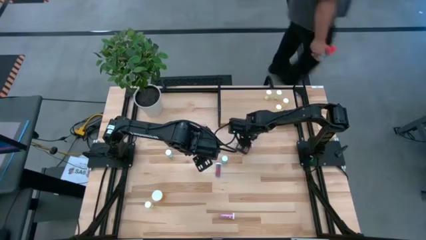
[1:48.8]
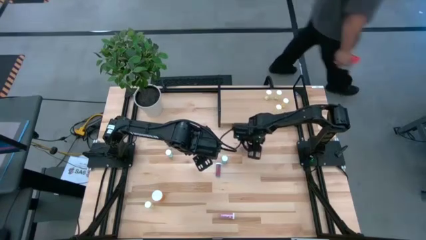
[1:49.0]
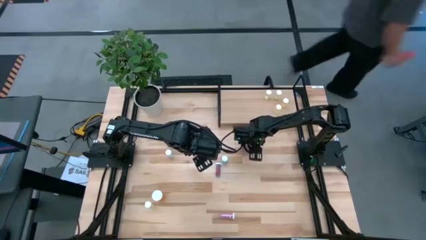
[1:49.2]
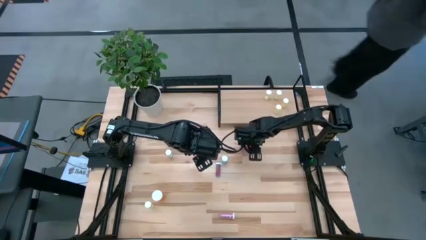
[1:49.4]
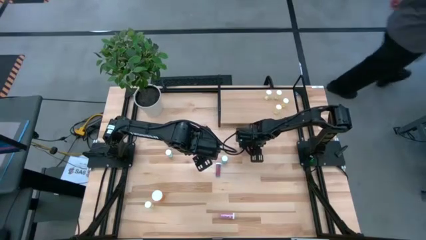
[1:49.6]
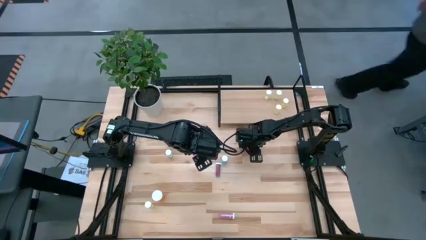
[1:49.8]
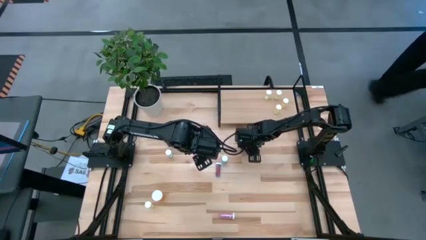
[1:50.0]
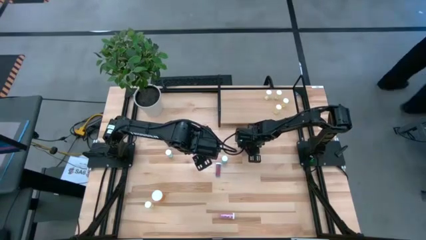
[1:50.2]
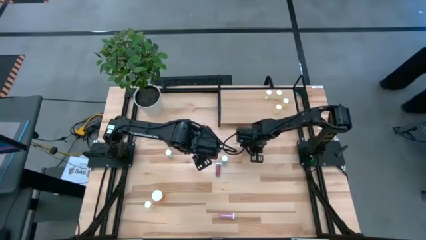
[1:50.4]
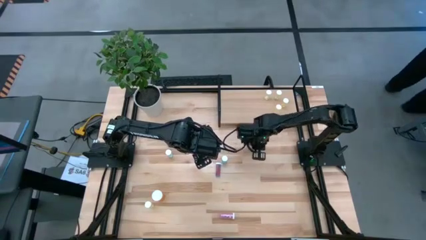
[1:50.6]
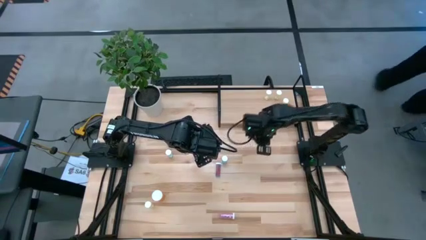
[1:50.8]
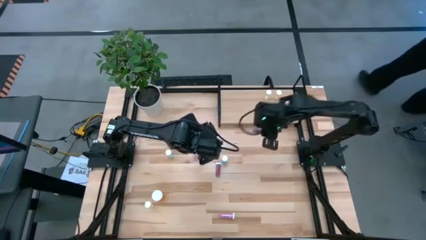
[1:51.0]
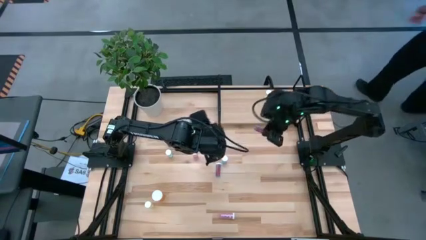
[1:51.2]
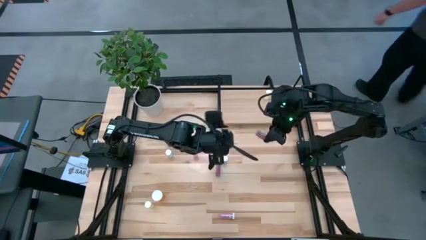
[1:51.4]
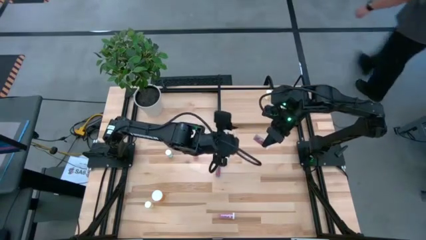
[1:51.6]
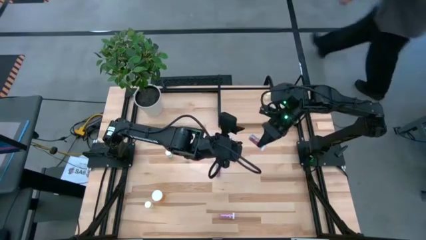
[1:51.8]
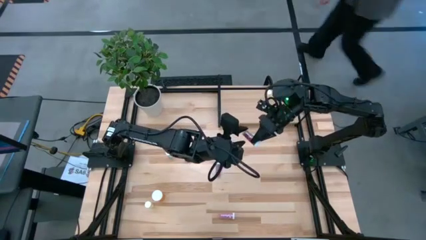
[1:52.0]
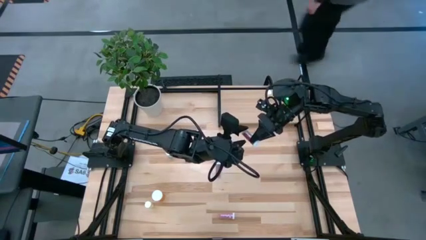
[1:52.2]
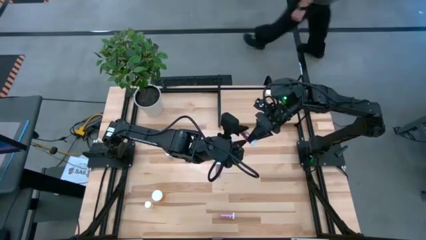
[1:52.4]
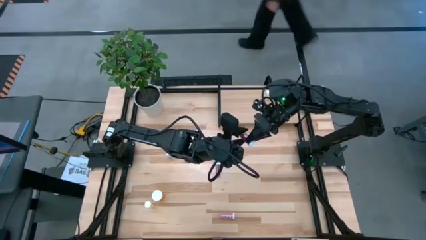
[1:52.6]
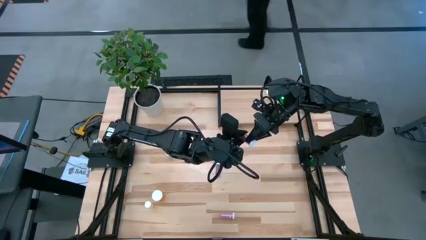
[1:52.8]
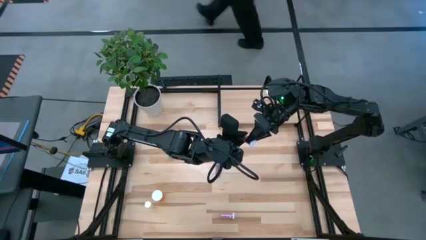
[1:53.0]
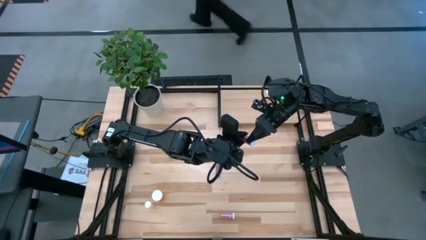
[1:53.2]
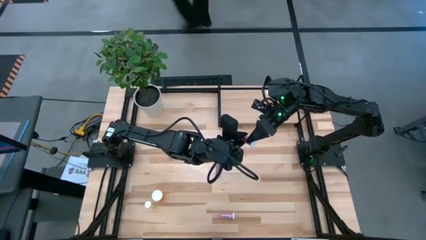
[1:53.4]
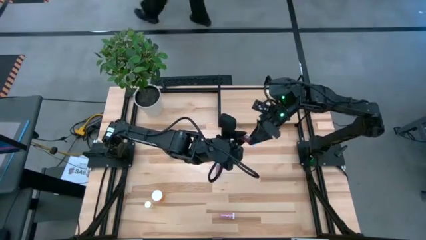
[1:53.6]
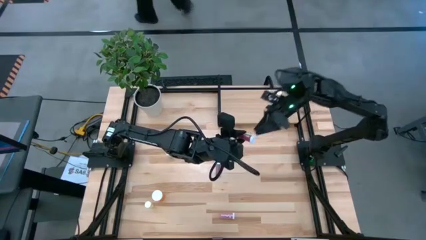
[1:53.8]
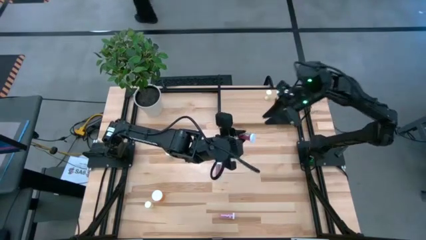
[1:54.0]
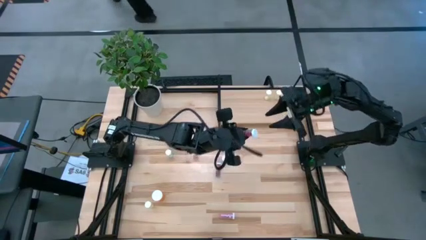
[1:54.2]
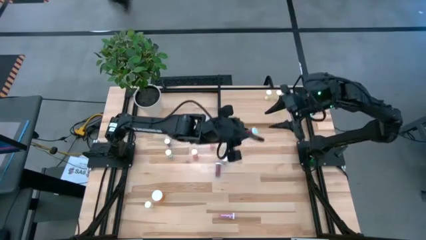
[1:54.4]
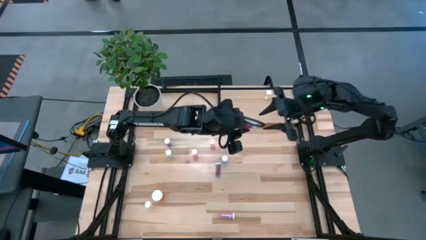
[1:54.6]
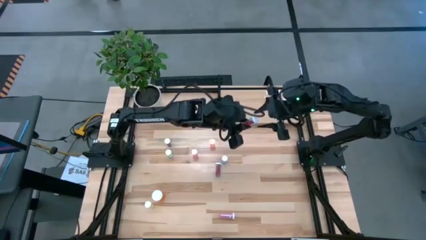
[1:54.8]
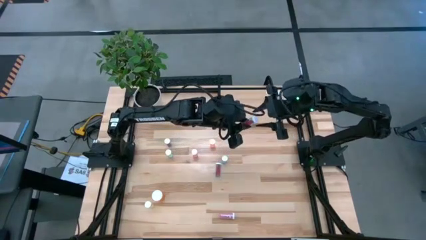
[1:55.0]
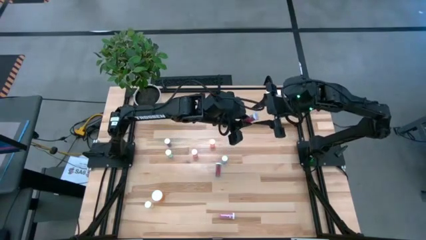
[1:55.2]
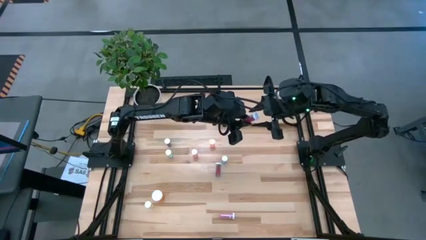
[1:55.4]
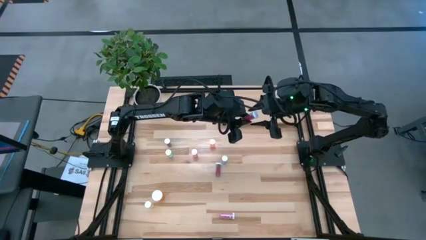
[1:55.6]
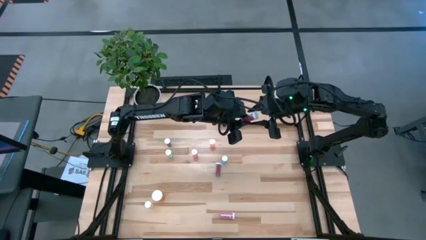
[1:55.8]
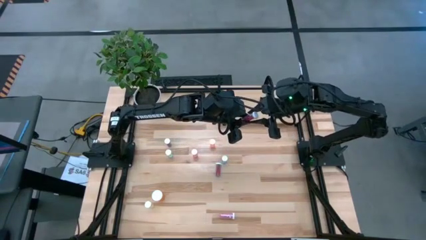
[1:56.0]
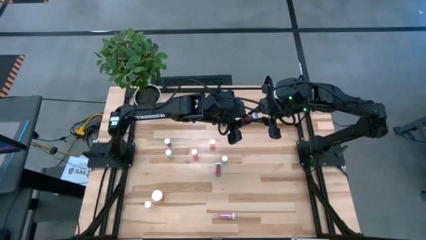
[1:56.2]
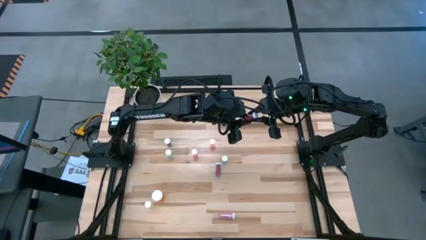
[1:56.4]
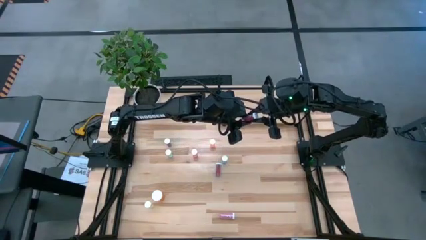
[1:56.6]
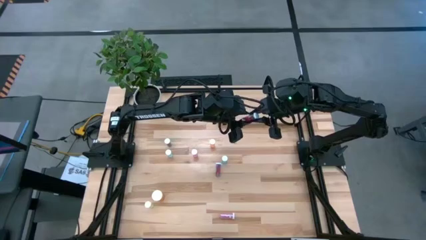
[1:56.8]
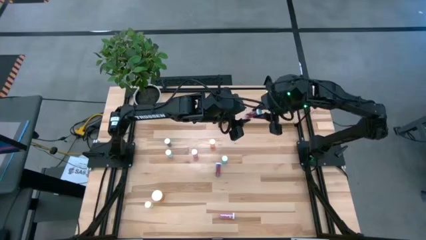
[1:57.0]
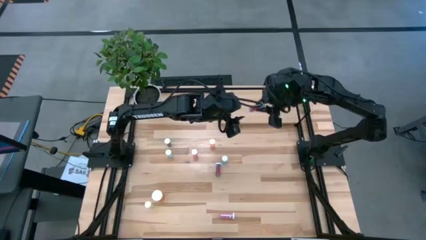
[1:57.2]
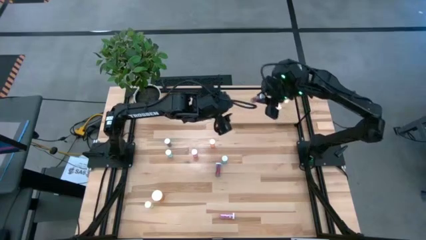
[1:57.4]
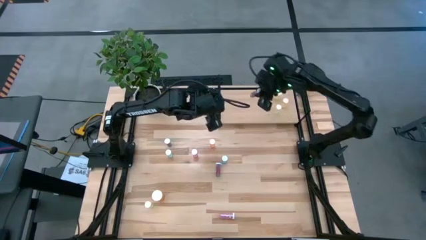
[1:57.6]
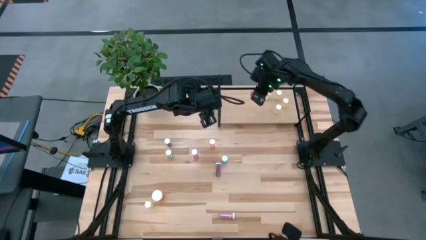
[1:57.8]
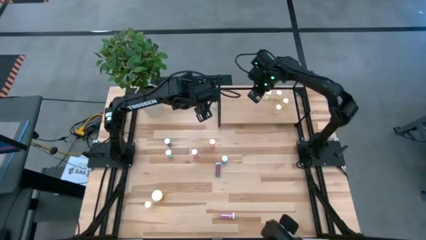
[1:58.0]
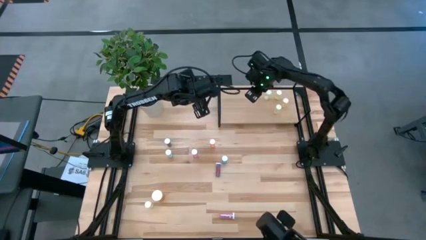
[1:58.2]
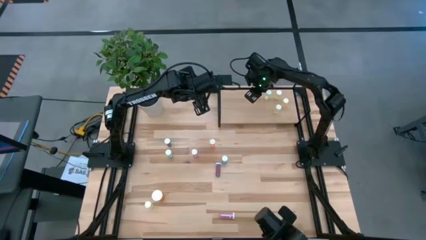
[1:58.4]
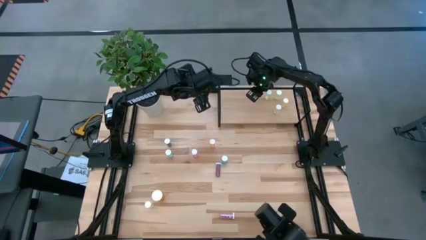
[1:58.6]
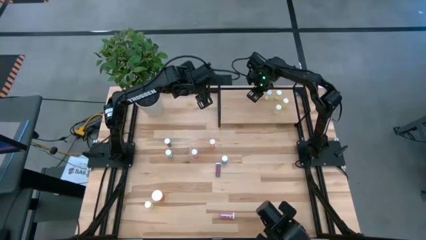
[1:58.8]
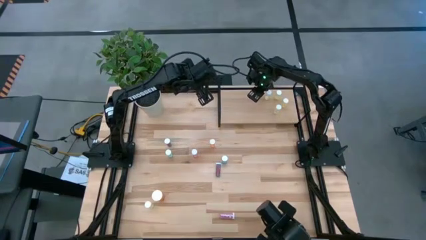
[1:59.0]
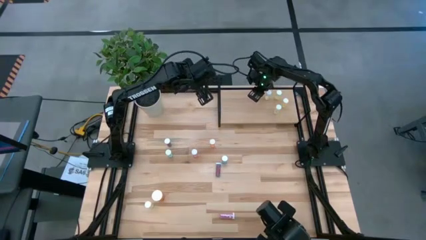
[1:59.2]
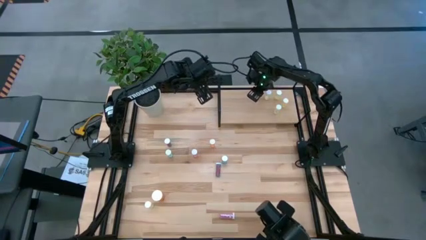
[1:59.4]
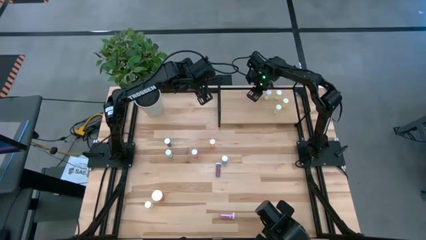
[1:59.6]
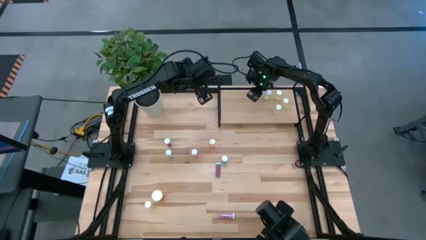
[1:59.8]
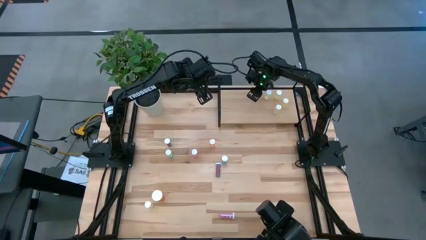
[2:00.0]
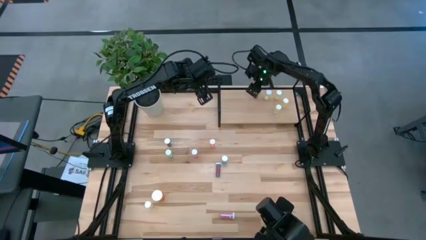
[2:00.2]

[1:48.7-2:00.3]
Task: Pick and place medicine bottles onto shelf by color
Put the blue pill bottle on the shelf
